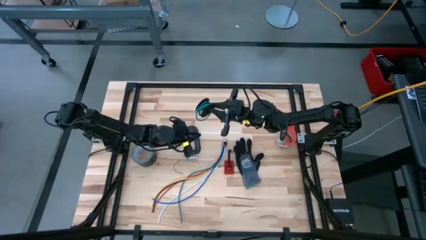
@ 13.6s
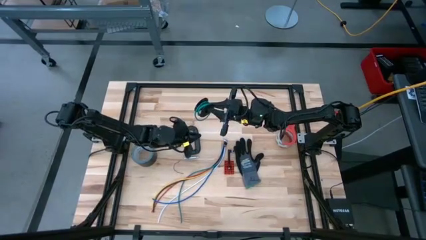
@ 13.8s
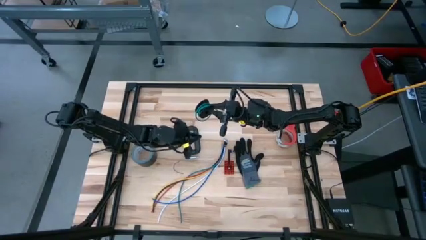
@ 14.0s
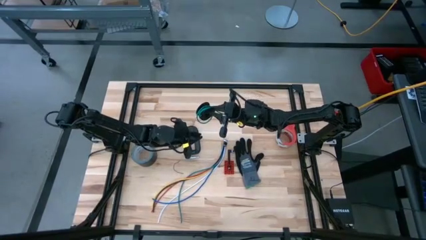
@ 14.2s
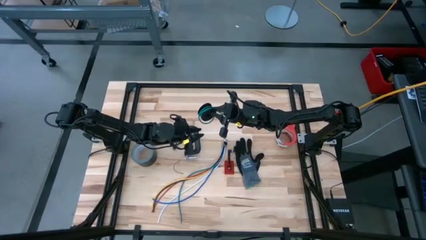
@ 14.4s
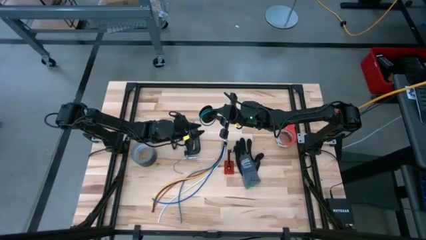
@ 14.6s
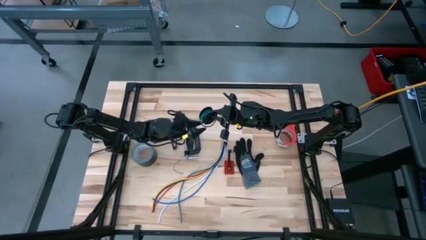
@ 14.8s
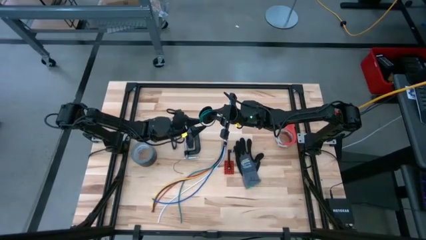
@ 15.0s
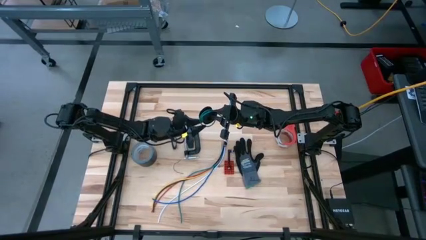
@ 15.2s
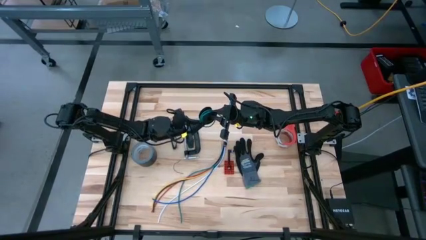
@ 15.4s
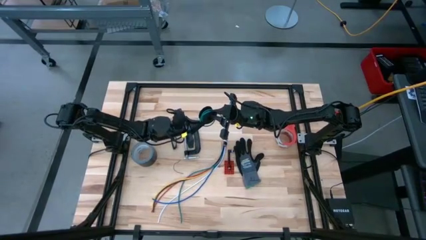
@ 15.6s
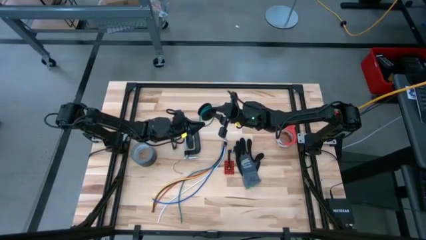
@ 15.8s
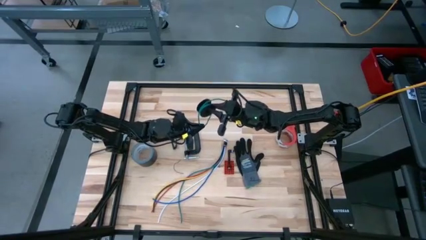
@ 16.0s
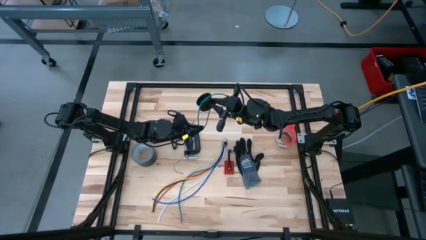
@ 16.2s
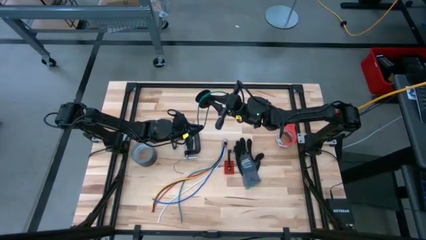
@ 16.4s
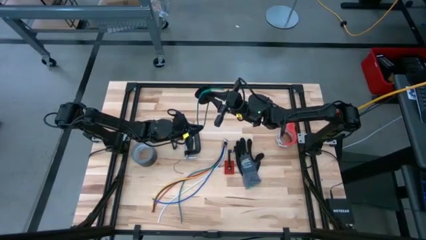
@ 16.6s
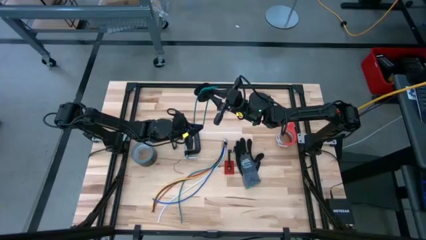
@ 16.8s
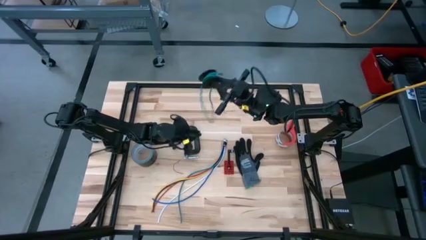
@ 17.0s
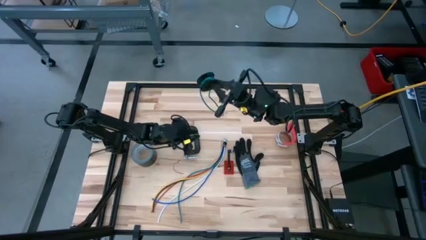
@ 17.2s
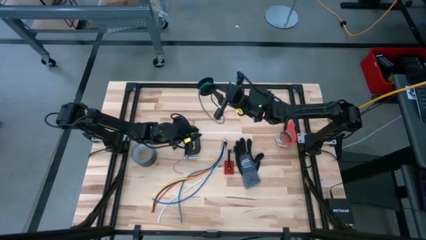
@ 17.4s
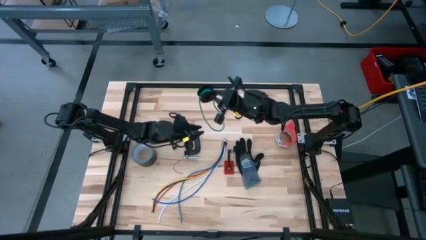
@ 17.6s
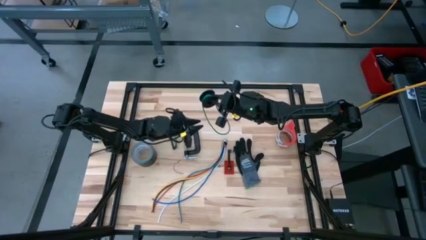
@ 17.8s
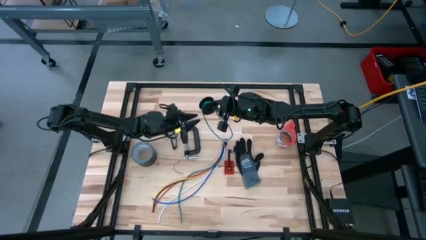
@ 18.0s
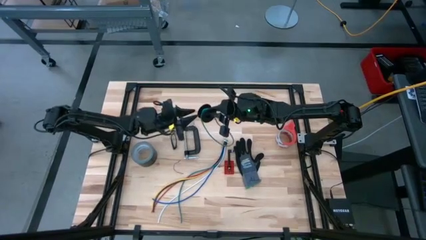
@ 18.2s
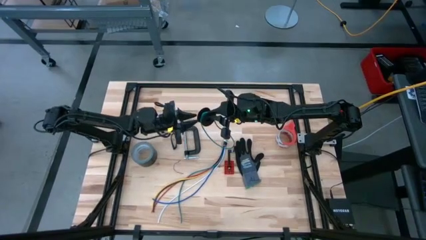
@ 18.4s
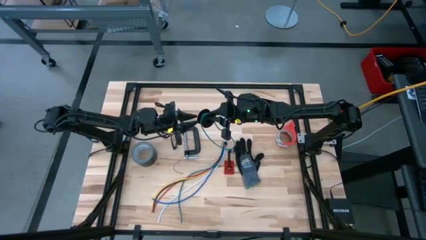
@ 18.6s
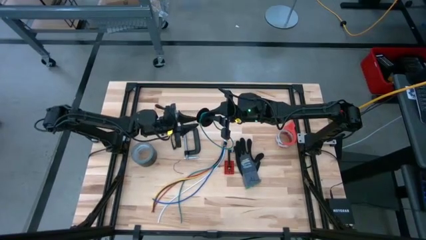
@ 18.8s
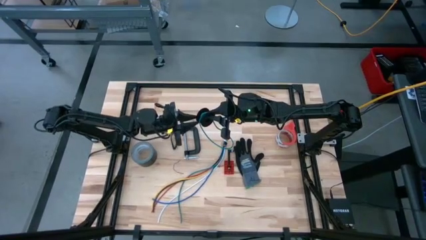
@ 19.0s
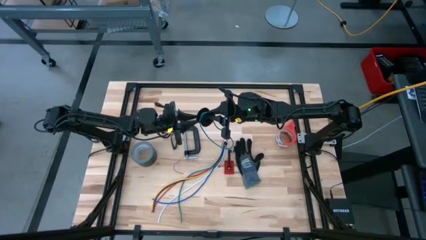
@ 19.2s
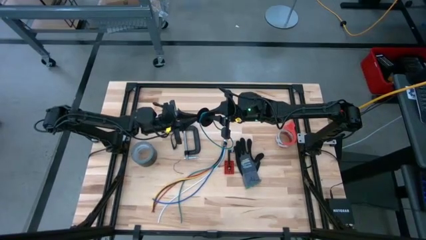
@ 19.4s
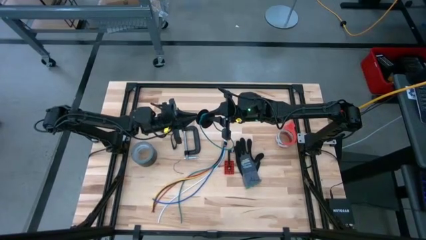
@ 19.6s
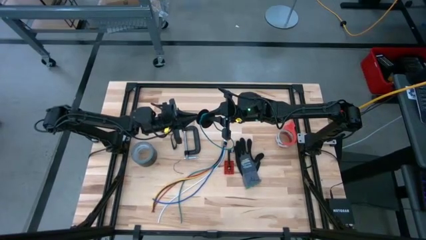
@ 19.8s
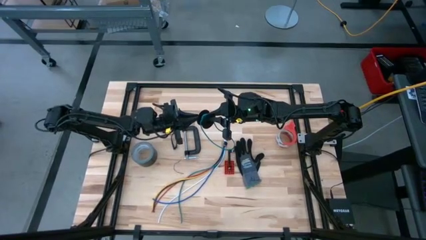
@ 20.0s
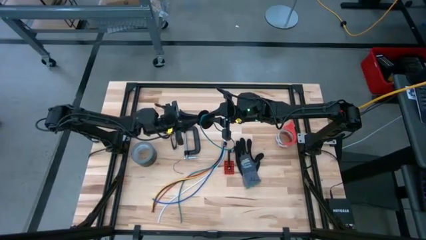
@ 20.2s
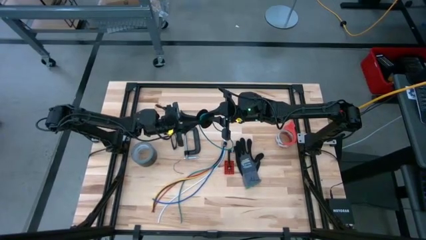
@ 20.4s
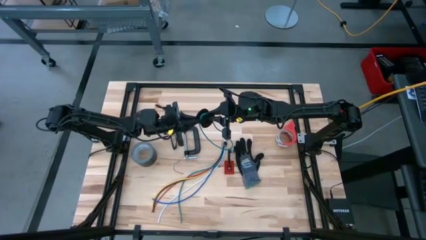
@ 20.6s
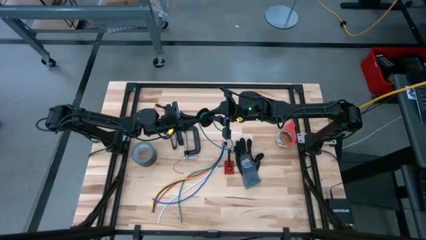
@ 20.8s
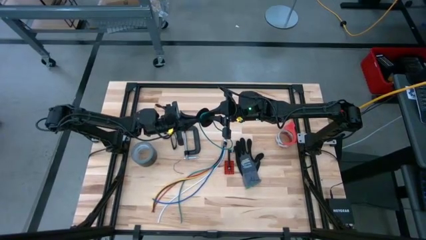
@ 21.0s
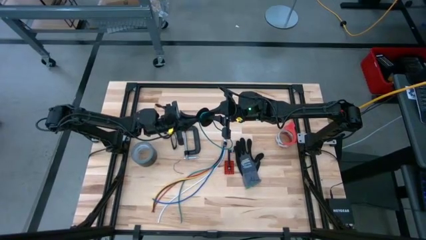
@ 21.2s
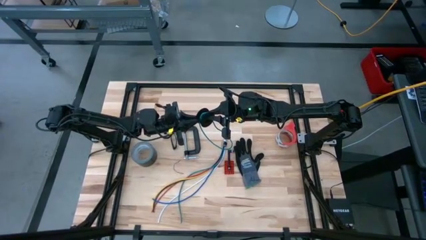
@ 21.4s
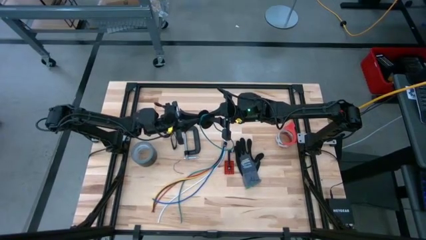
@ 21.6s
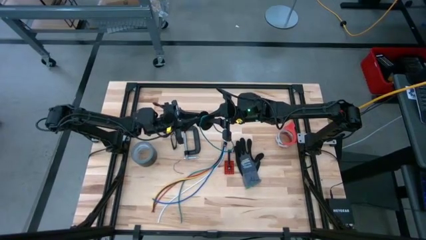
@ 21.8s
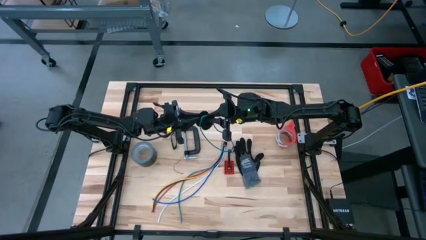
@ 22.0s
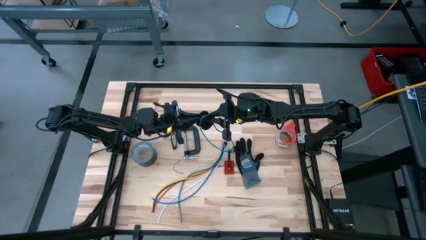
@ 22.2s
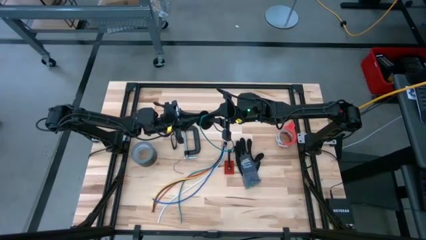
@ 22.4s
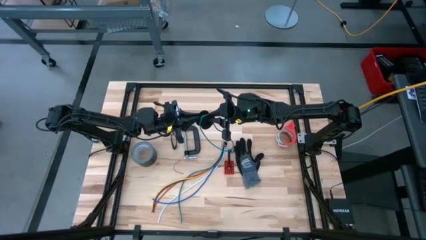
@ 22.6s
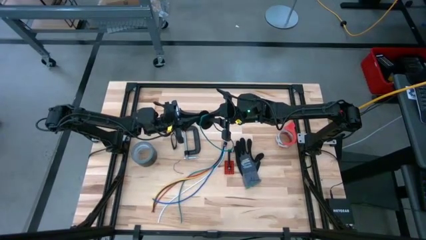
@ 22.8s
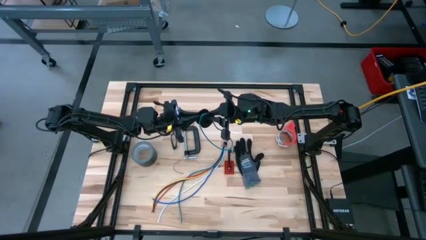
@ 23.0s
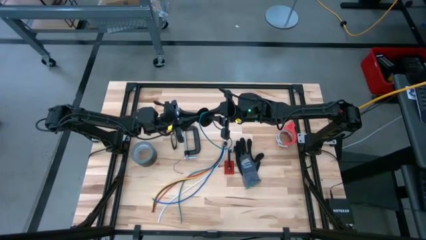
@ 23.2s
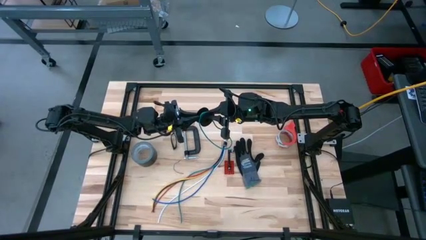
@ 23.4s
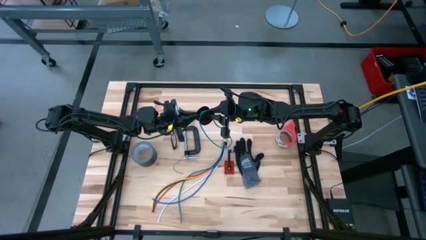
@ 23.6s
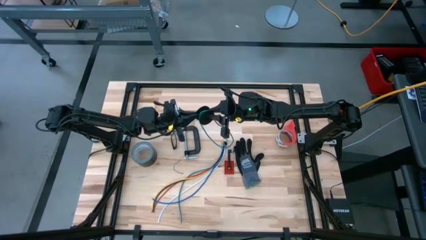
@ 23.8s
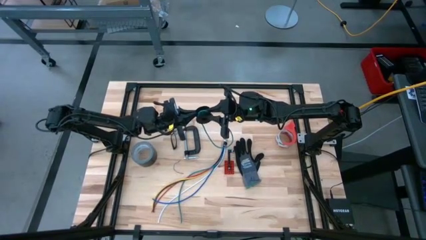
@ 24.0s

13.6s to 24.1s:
Task: Coil cords
Uncoil the green wire from the spool

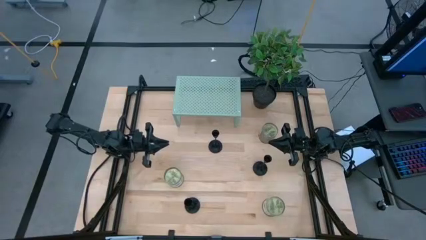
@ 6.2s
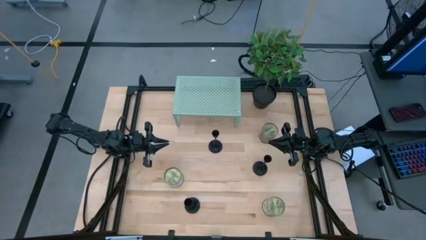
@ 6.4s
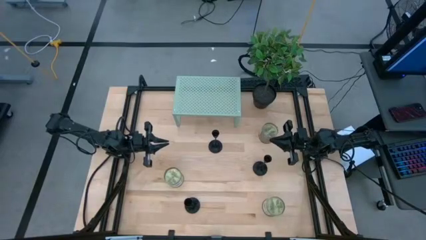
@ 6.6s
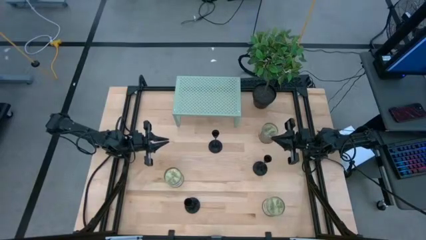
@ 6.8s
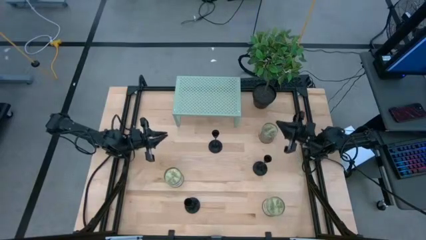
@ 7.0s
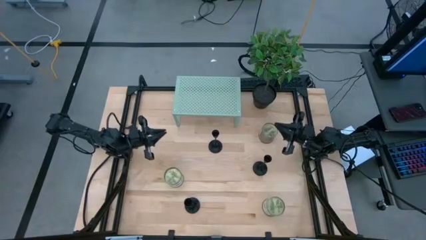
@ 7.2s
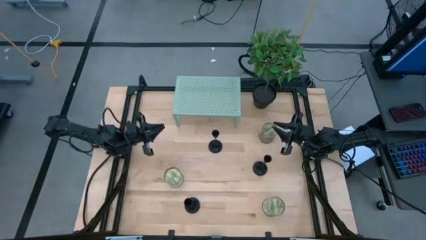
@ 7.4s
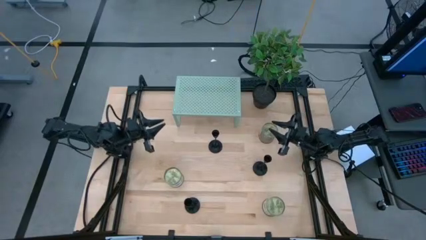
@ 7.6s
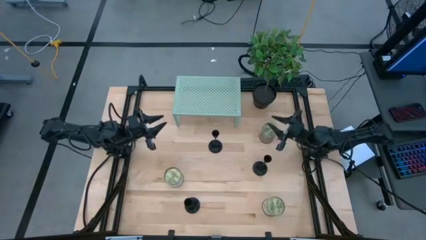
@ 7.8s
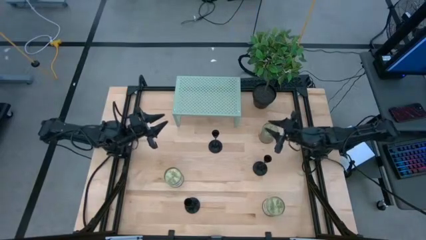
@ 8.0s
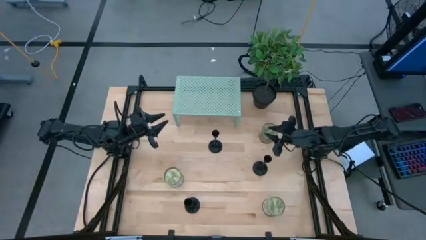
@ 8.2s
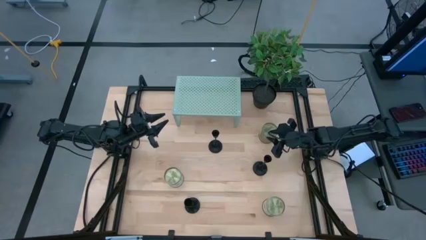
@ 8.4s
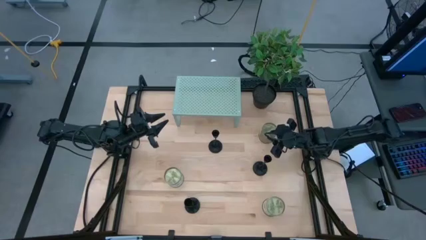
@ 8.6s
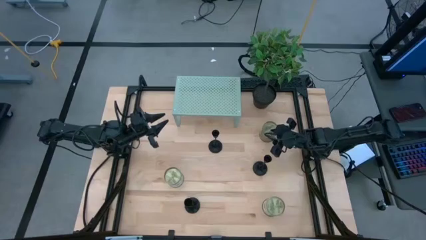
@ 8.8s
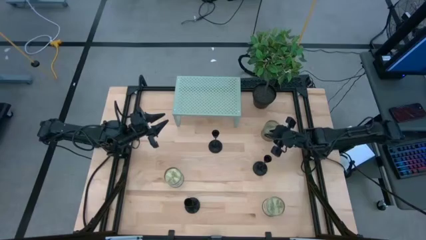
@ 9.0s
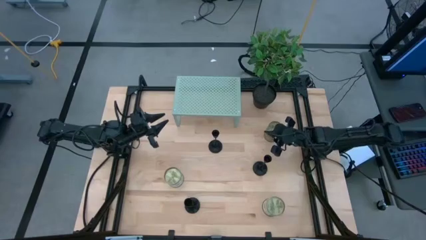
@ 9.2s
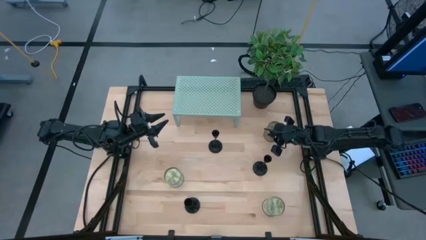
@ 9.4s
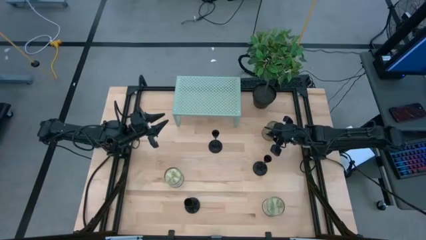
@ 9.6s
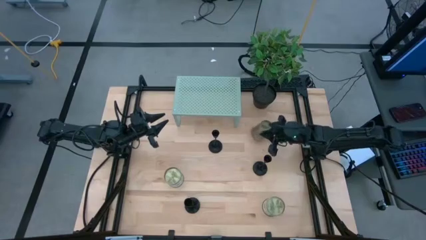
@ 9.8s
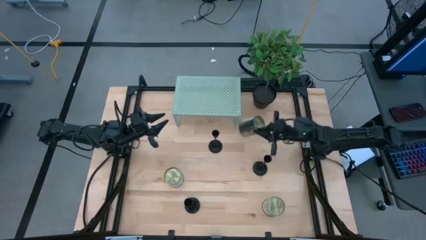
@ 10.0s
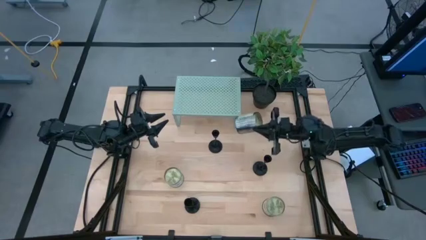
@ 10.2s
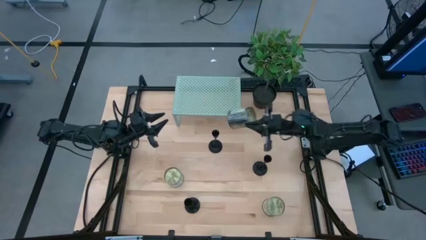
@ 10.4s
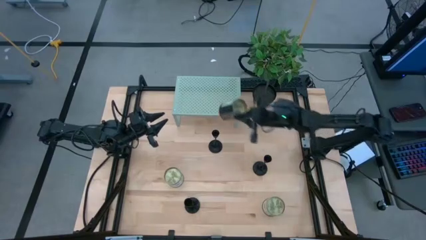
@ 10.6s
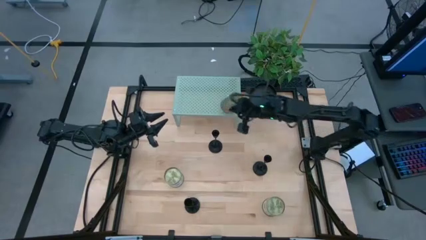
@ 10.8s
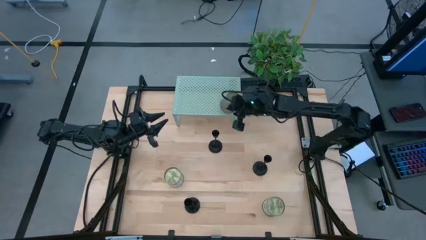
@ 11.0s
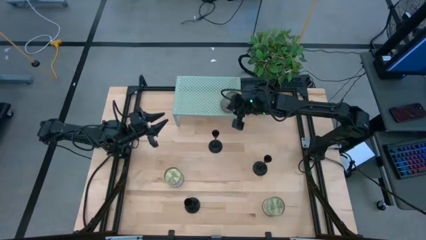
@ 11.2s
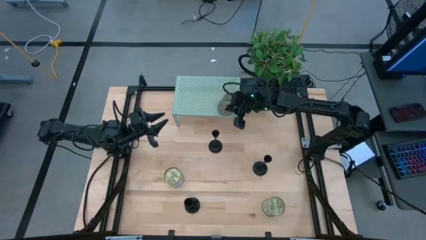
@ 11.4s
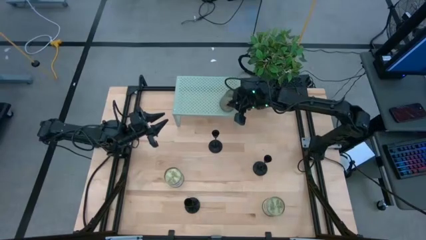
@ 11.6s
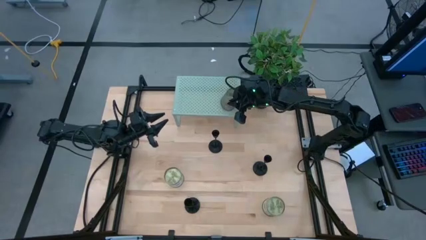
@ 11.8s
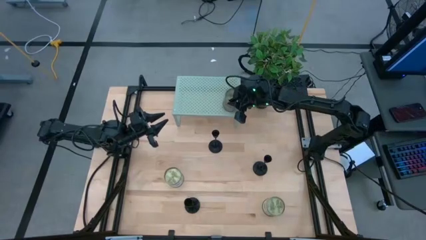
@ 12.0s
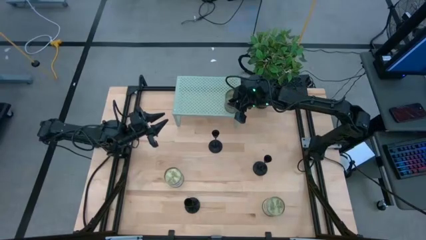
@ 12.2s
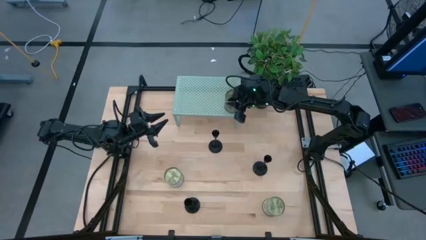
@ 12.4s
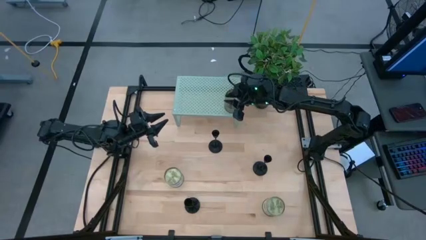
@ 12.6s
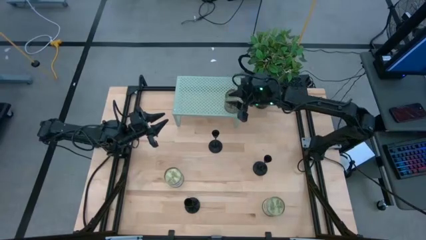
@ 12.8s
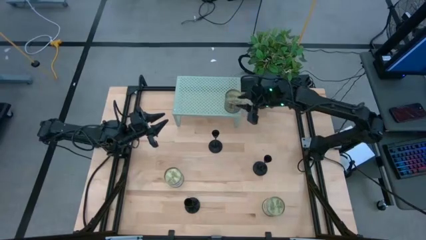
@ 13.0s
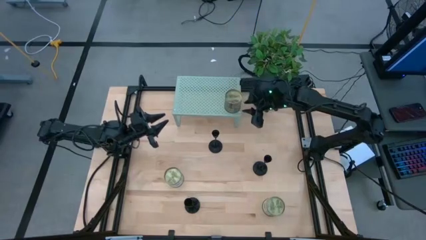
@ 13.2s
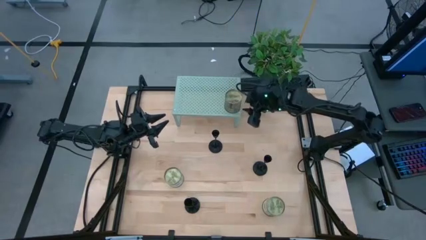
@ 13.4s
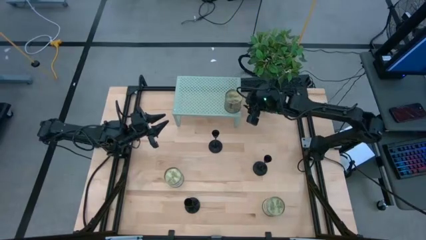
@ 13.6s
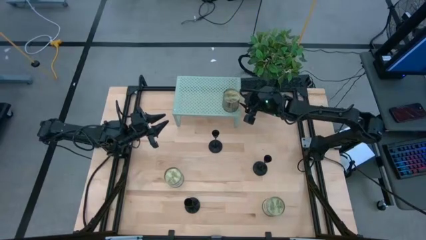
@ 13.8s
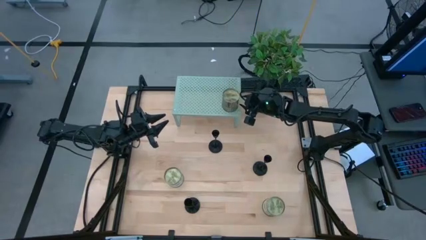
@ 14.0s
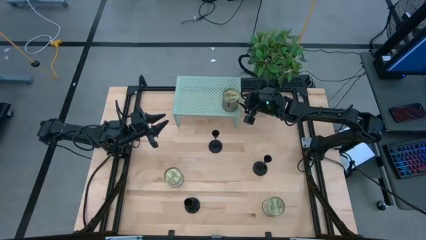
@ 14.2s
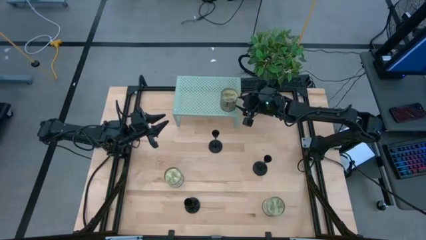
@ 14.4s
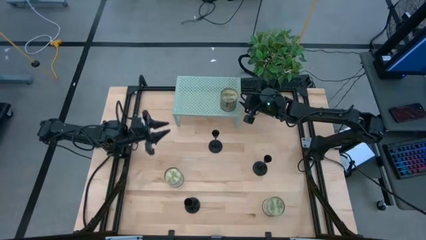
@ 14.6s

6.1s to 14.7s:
Task: Pick & Place candle stick holders
Put the top jar candle on the shelf
